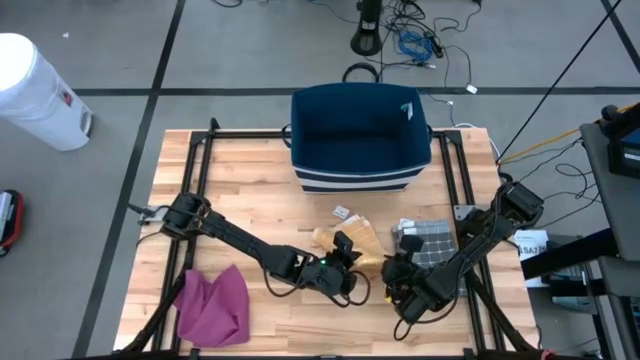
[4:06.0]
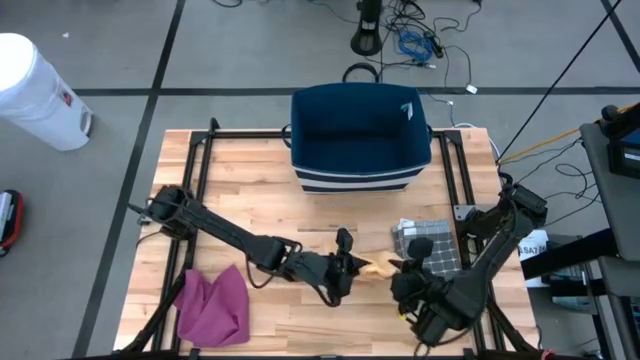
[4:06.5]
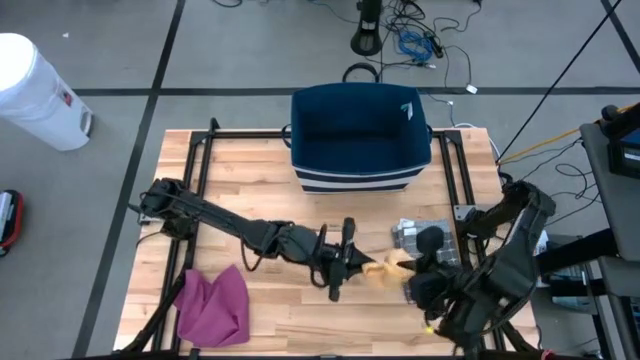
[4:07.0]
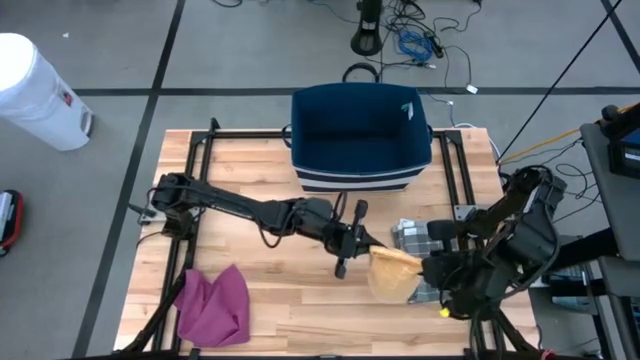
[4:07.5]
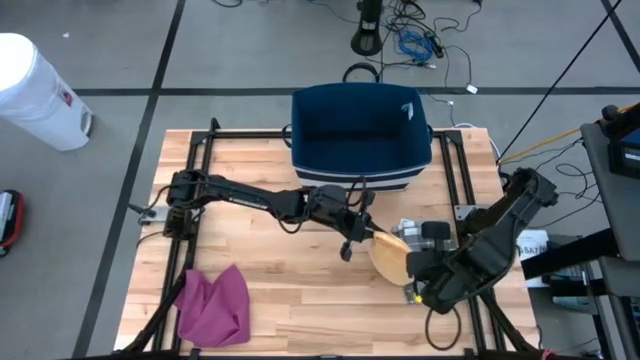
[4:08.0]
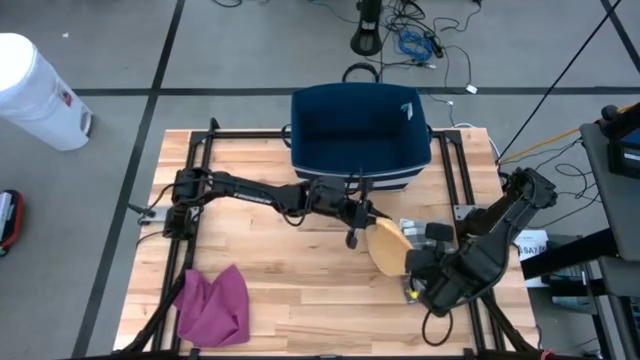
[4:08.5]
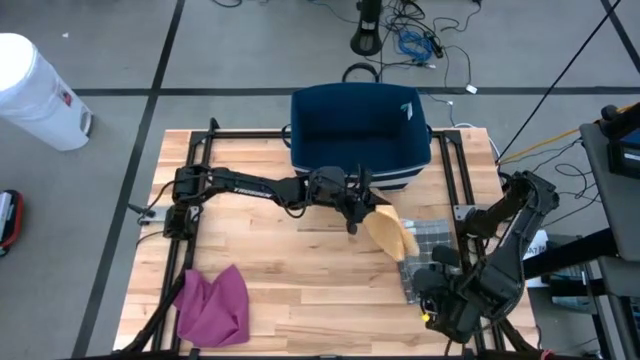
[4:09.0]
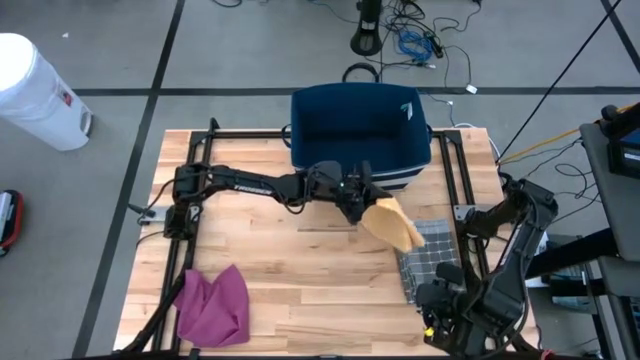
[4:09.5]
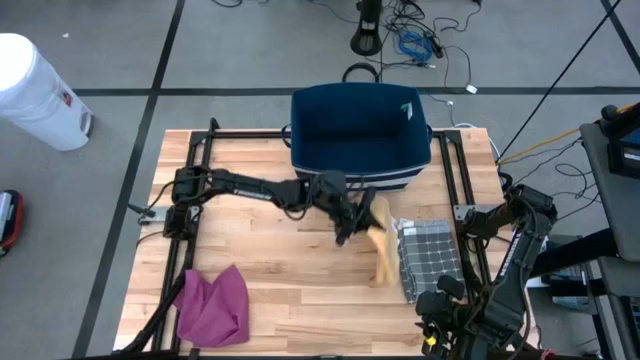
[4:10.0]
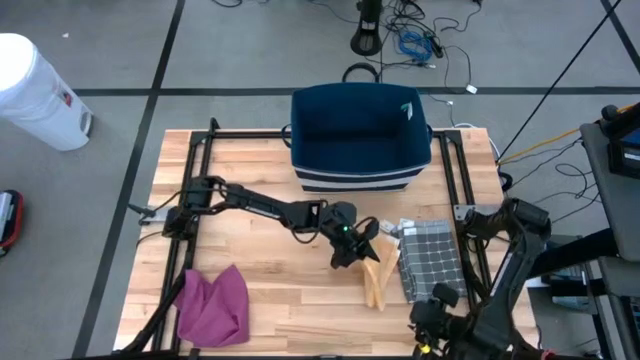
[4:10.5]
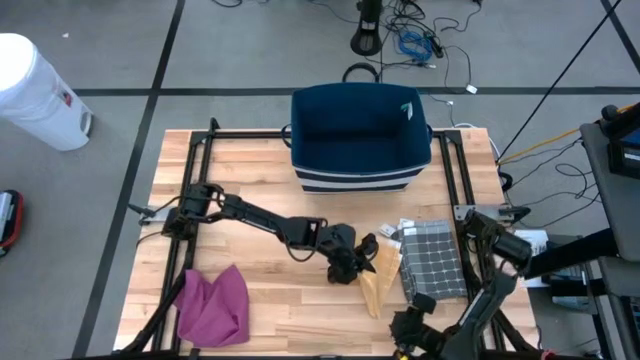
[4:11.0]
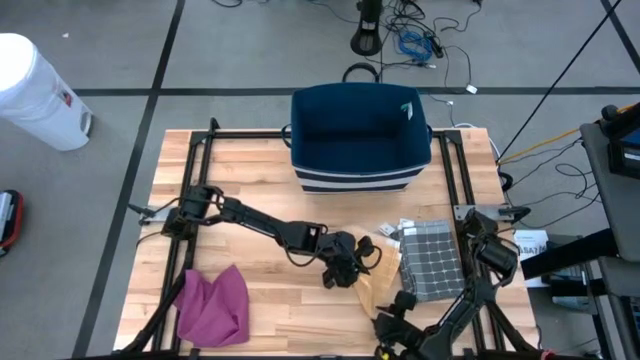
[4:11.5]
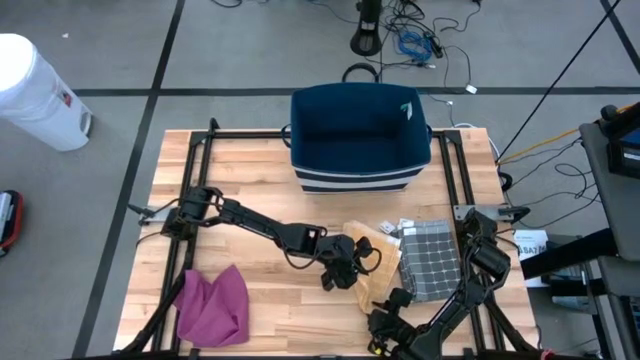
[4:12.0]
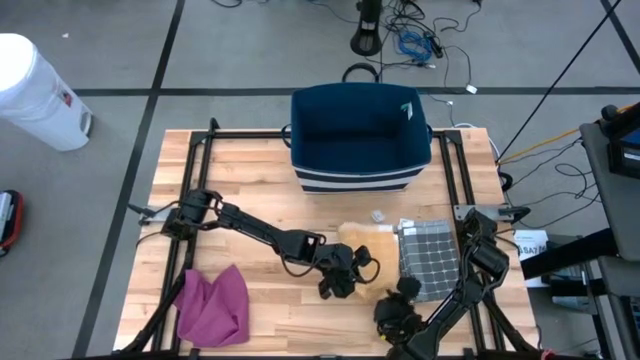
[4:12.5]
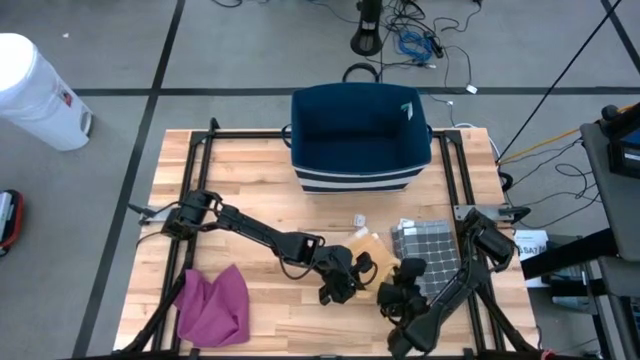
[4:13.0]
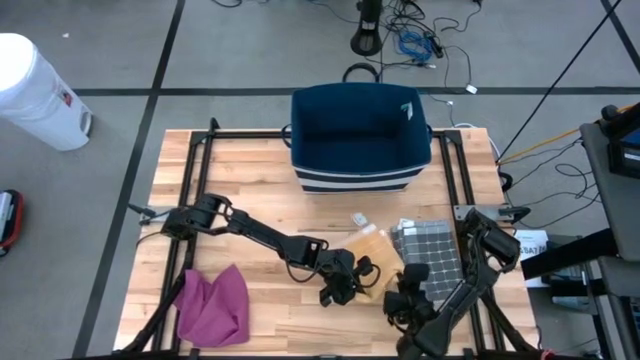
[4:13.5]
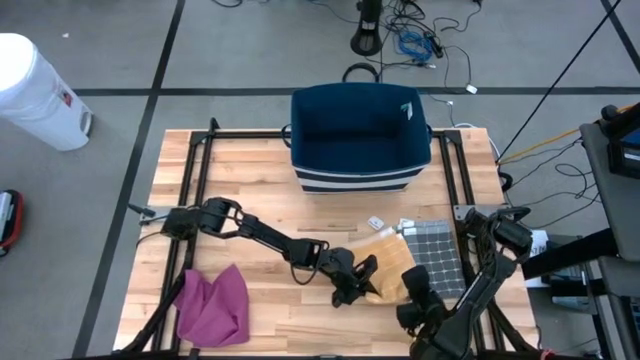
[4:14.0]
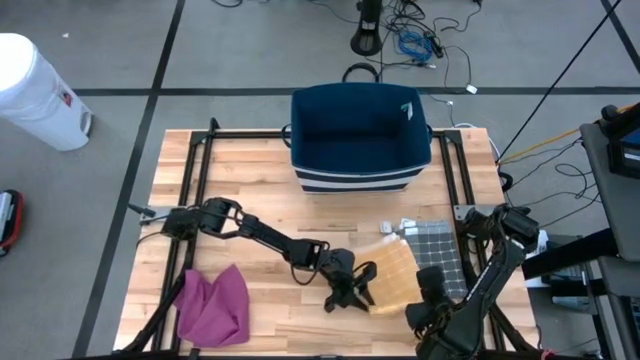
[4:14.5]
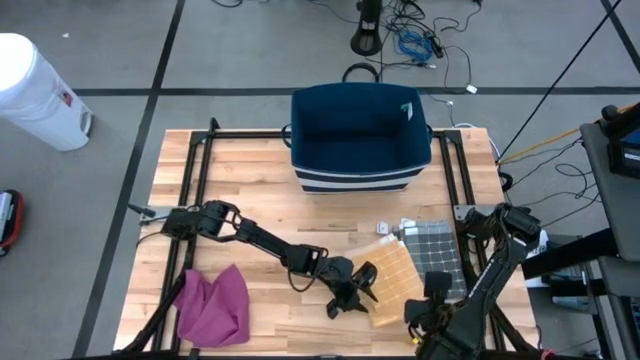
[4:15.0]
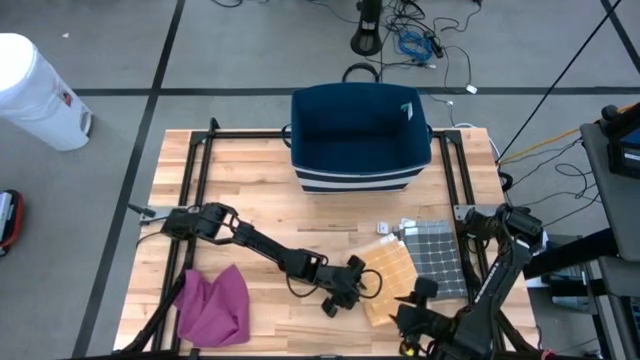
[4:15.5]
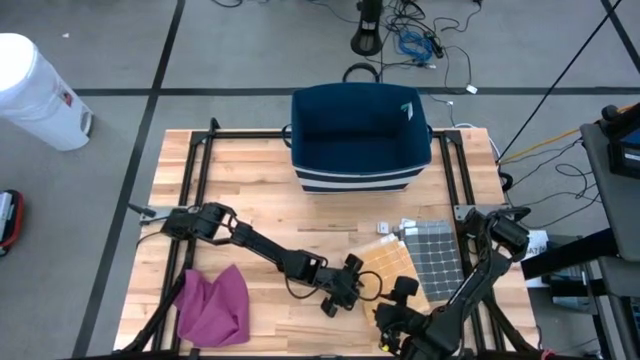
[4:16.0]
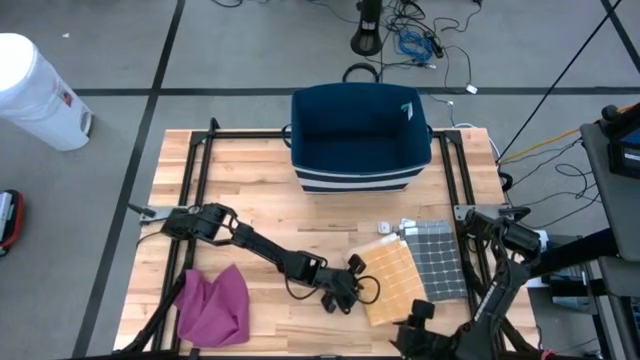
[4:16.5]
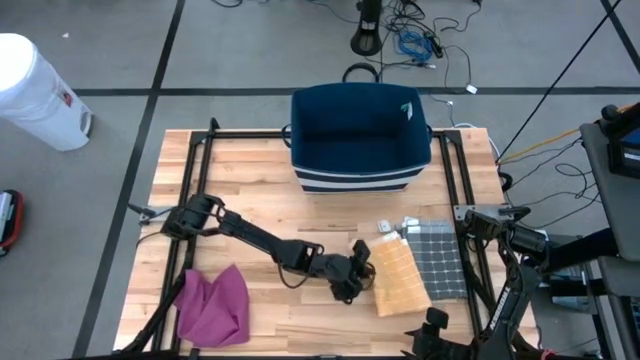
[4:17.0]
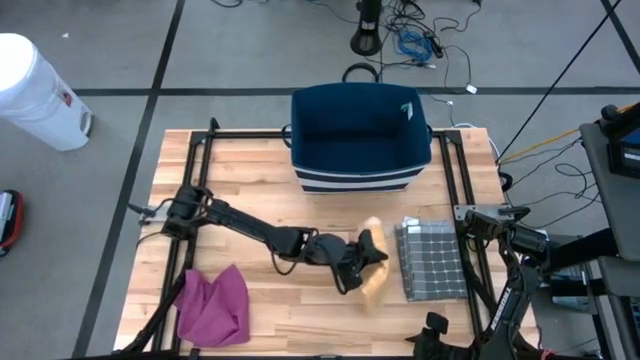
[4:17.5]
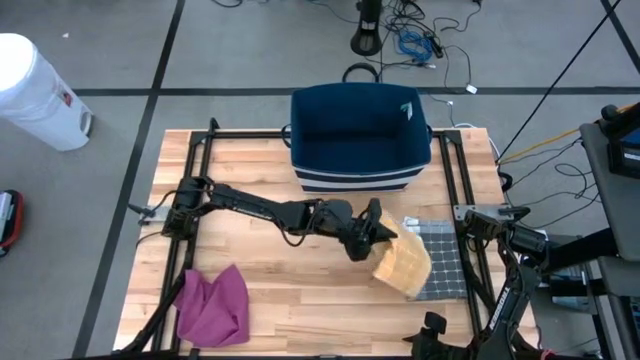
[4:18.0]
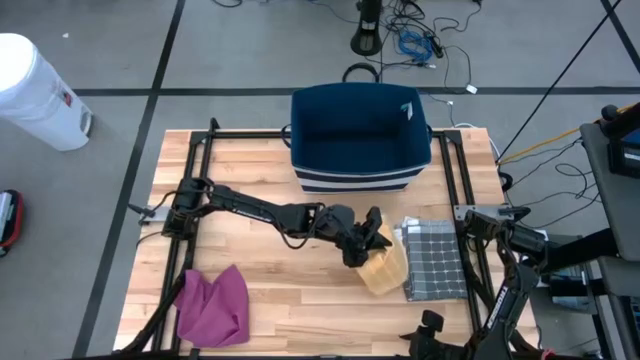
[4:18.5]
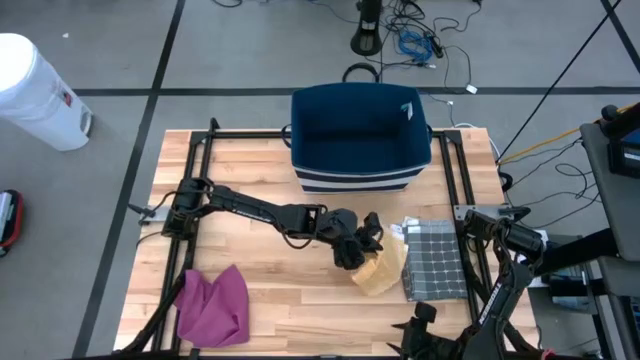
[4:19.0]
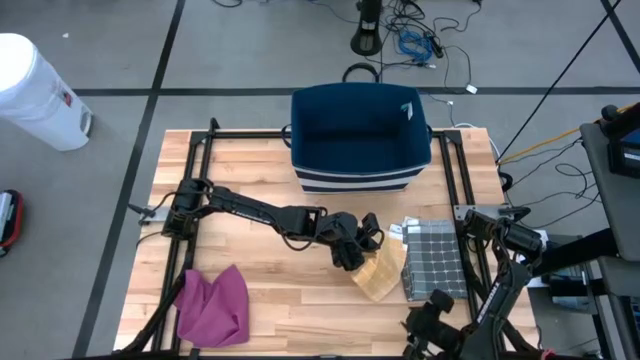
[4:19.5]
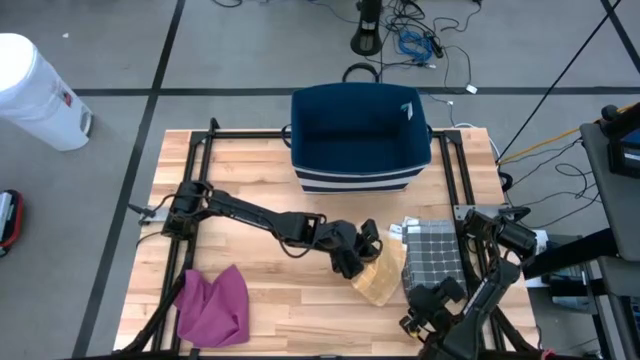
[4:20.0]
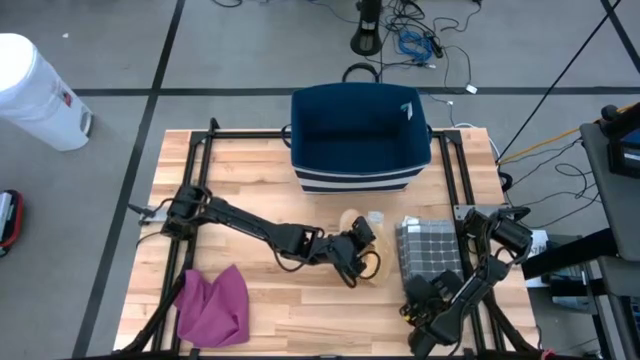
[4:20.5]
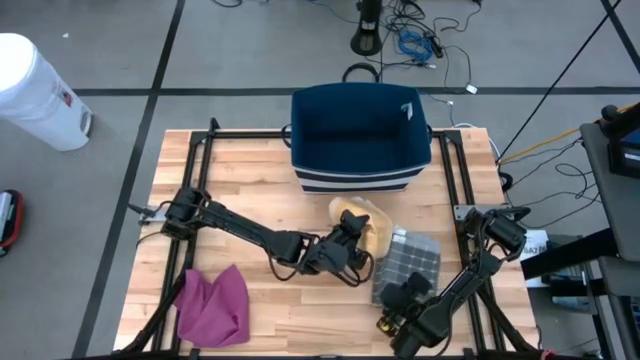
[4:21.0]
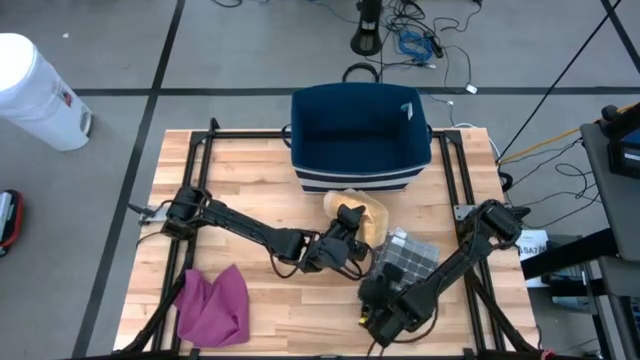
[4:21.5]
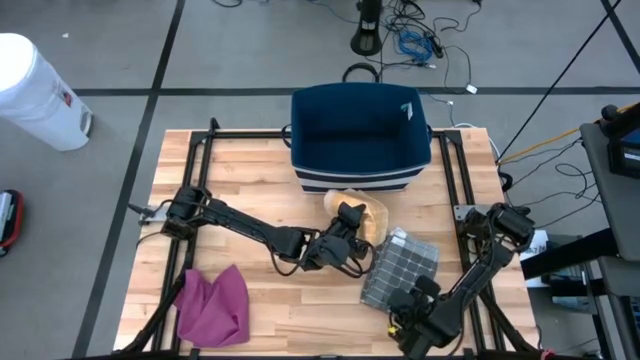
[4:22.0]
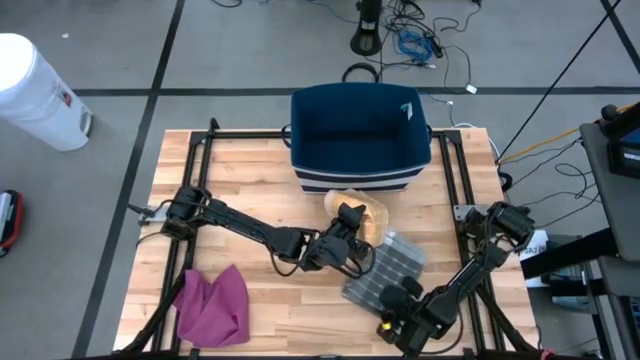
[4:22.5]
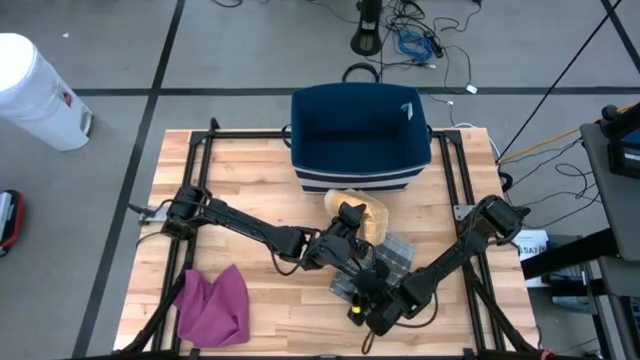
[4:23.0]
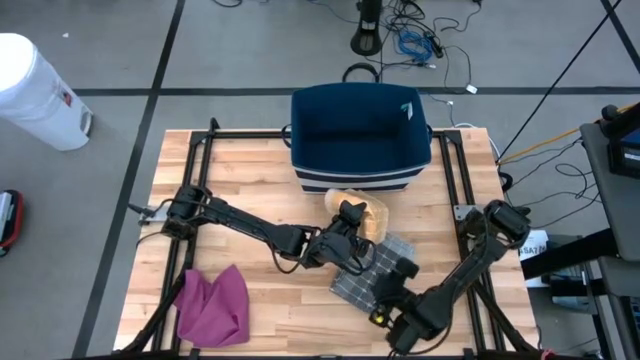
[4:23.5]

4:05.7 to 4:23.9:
Task: Fold towel
Stack the orange patterned towel on the gray patterned towel

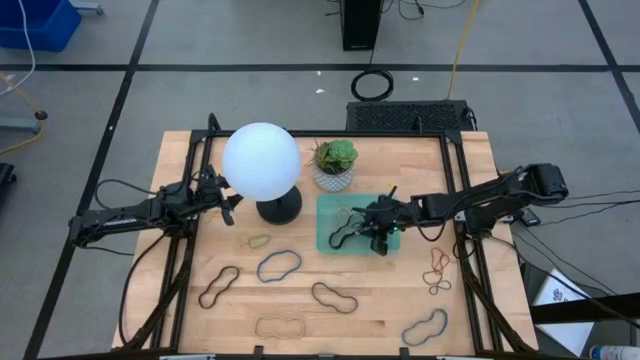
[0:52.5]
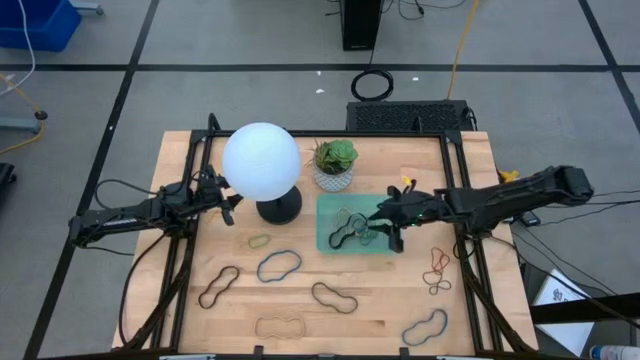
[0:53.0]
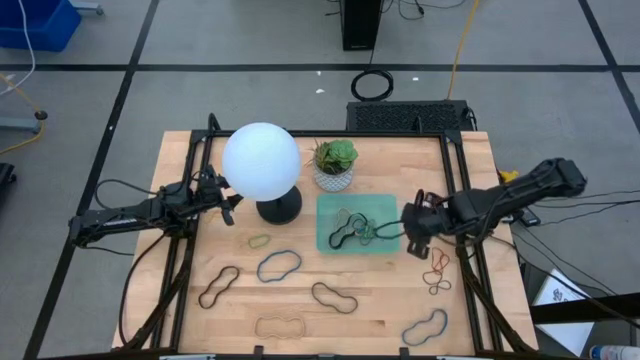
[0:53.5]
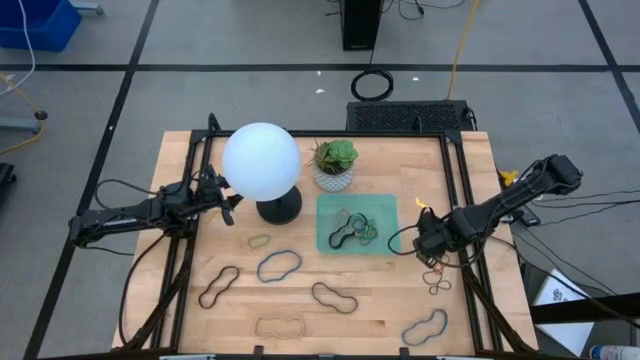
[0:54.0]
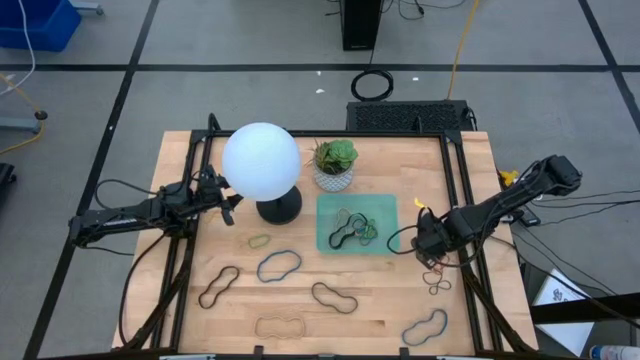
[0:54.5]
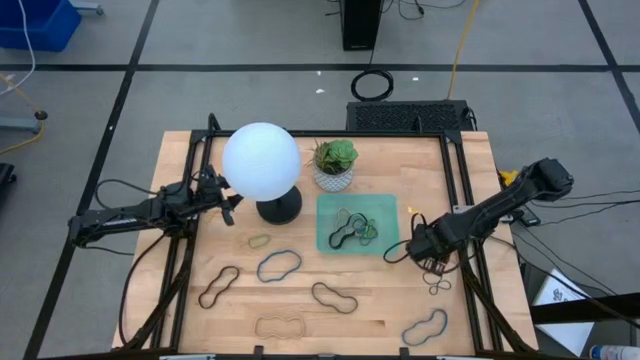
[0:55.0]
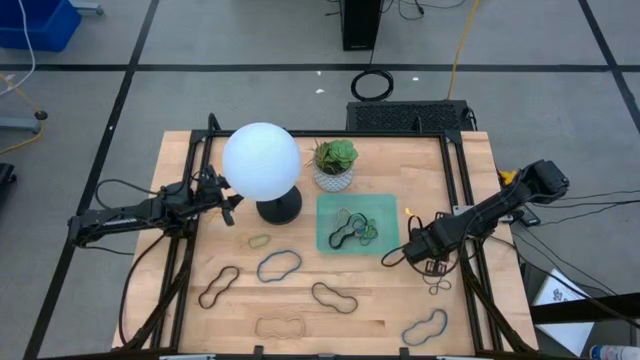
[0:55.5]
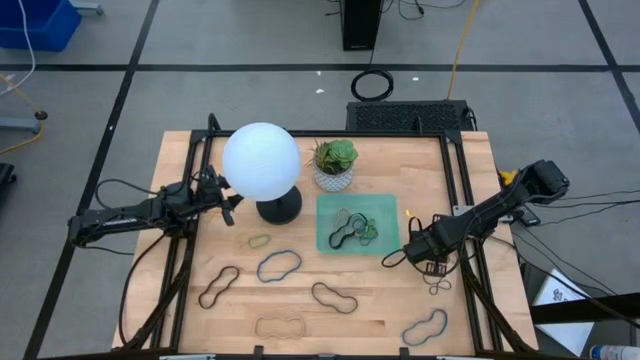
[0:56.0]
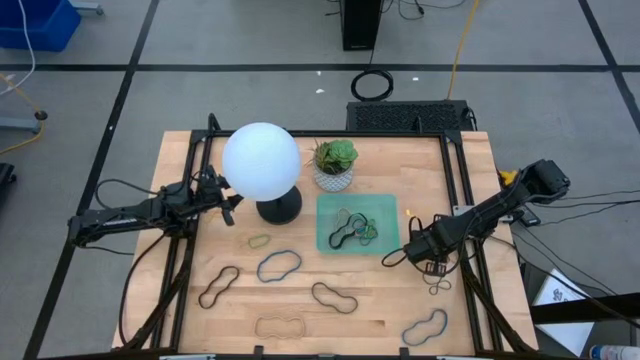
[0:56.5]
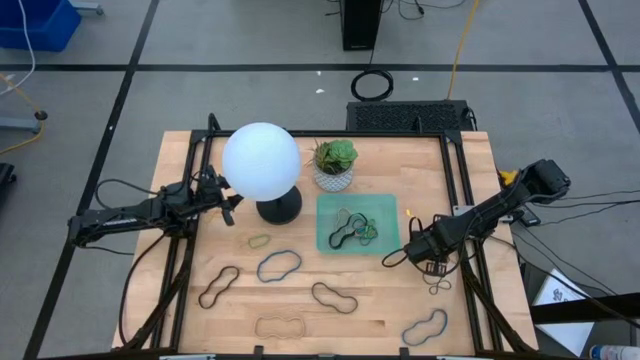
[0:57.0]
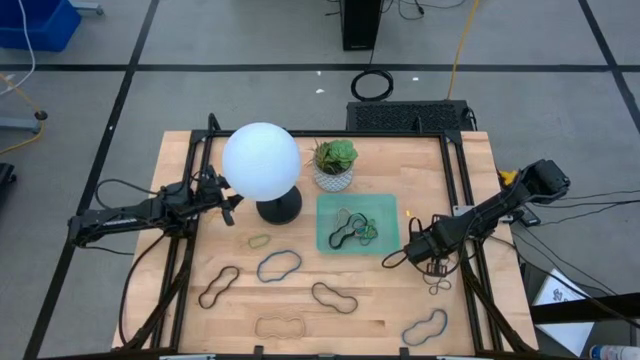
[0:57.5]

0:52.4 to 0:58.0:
Task: Pick and place rubber bands into bin
Put the red rubber band into the blue bin
